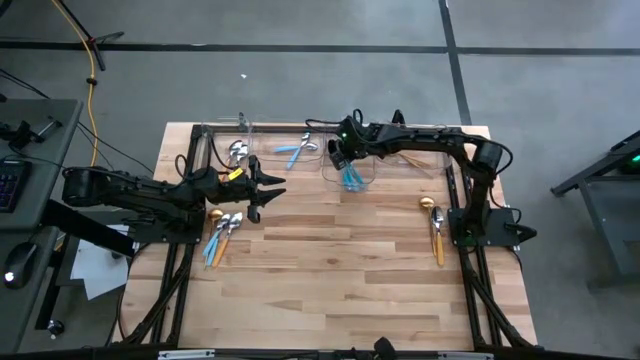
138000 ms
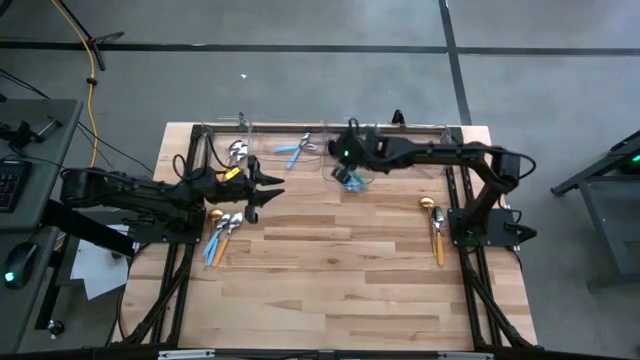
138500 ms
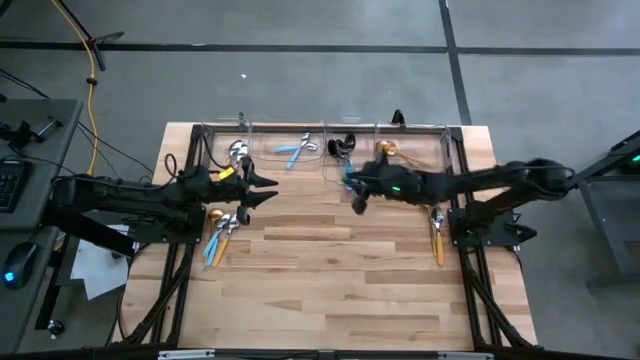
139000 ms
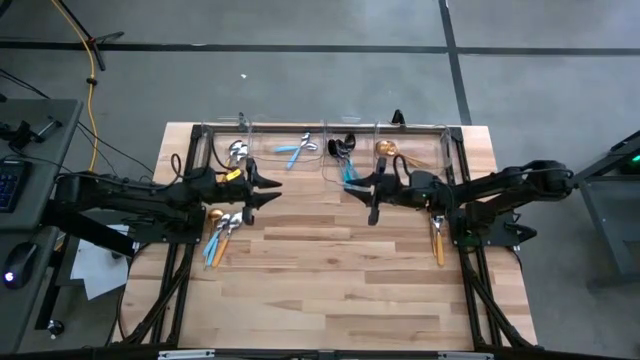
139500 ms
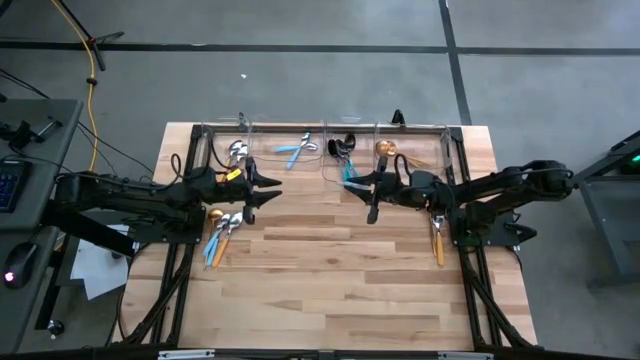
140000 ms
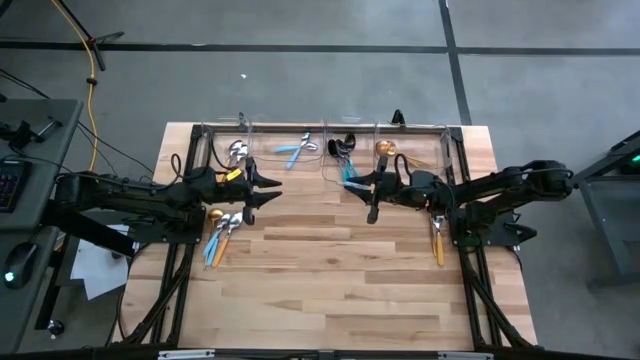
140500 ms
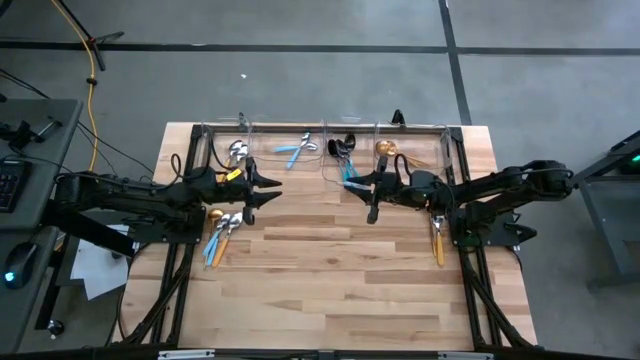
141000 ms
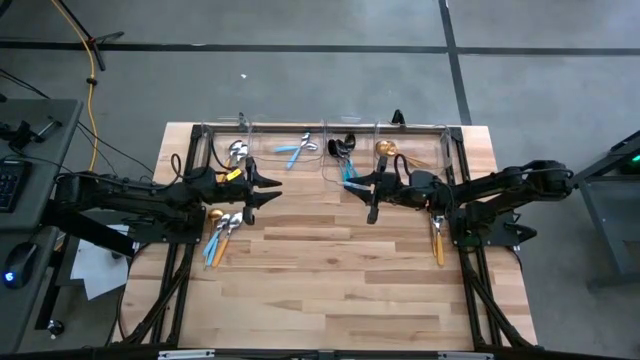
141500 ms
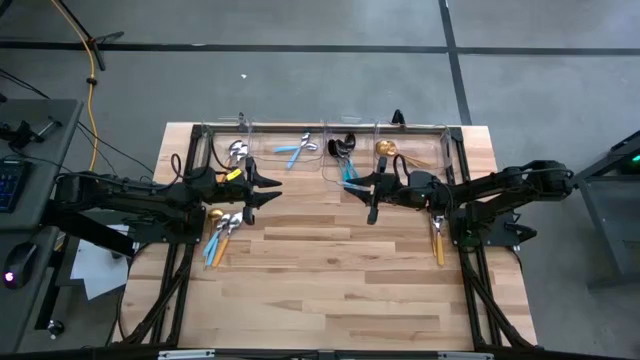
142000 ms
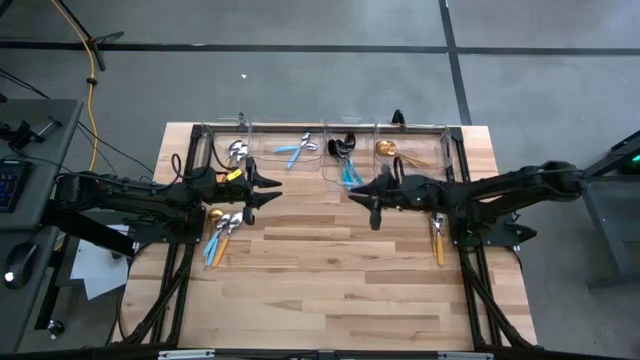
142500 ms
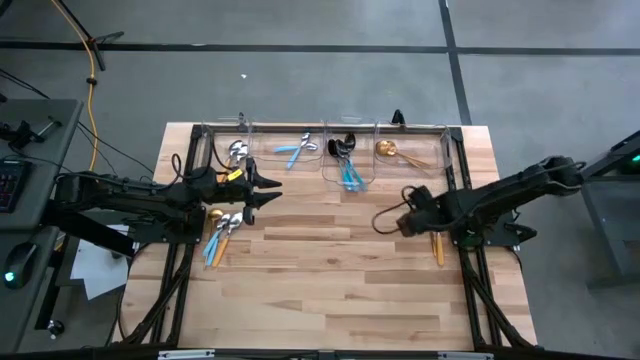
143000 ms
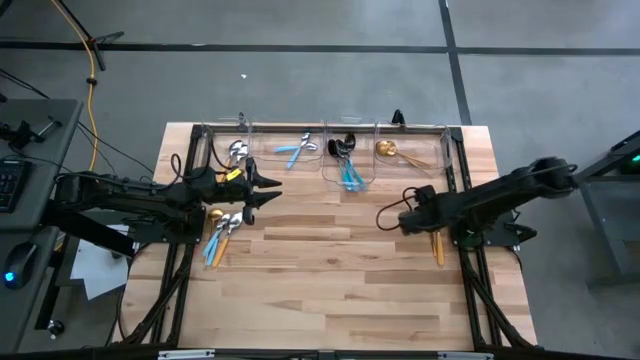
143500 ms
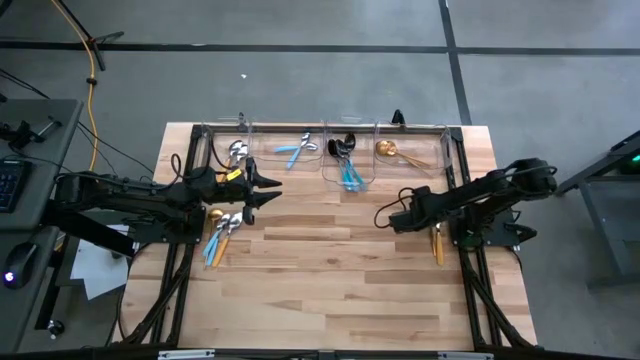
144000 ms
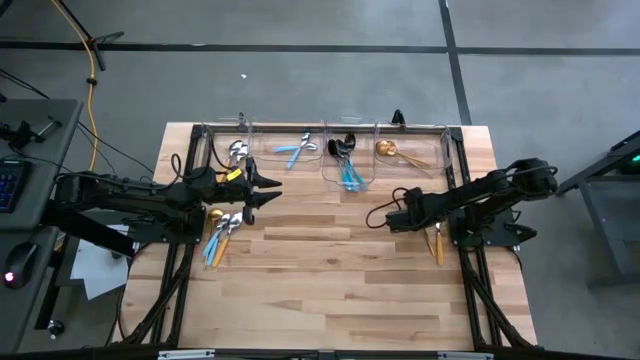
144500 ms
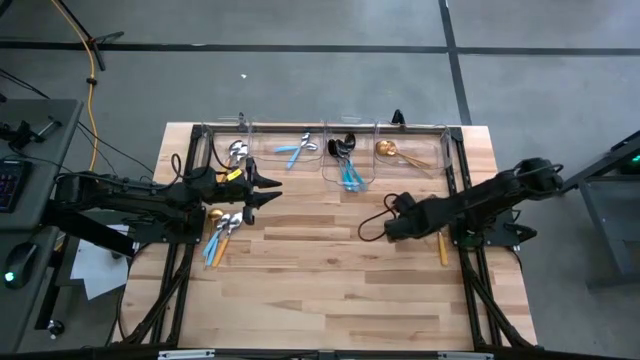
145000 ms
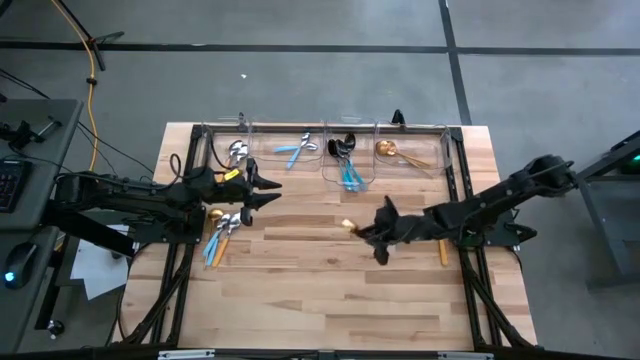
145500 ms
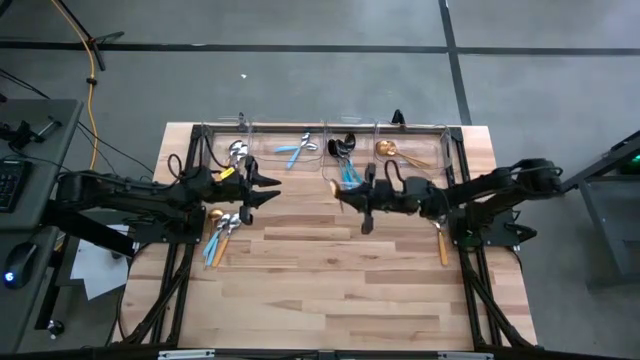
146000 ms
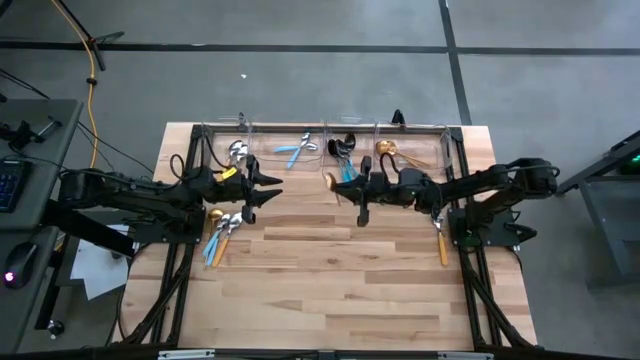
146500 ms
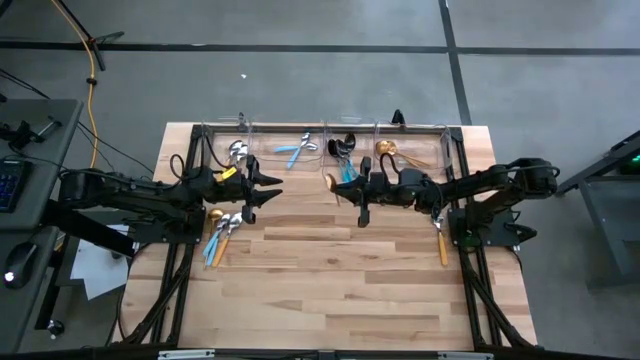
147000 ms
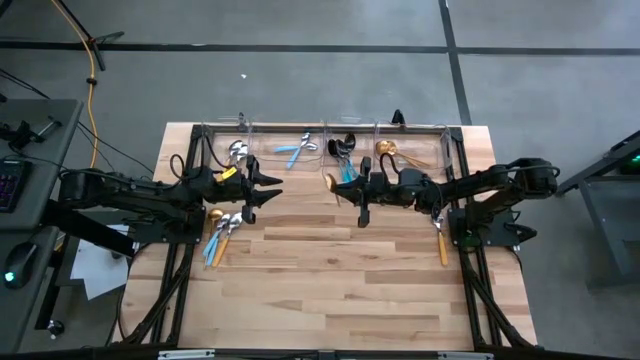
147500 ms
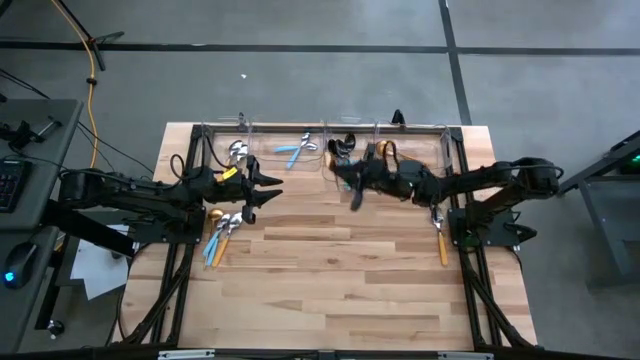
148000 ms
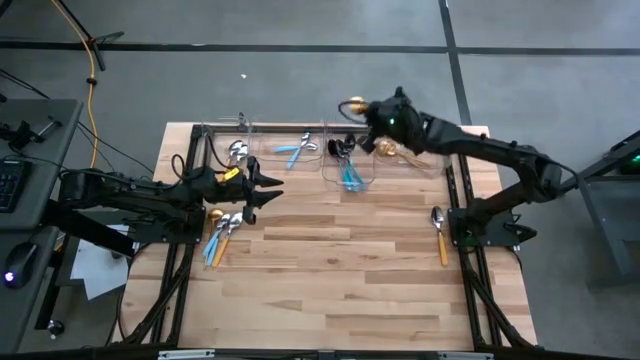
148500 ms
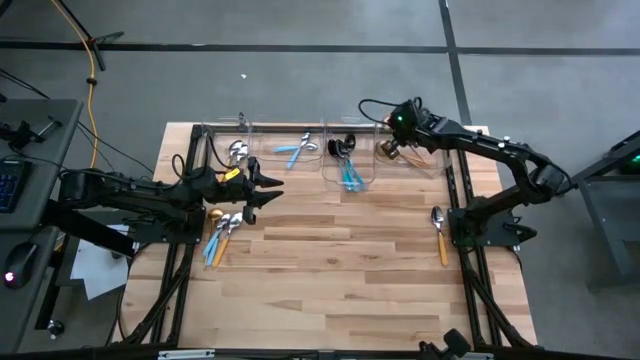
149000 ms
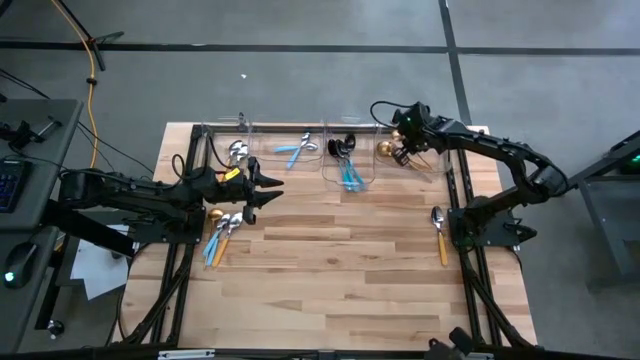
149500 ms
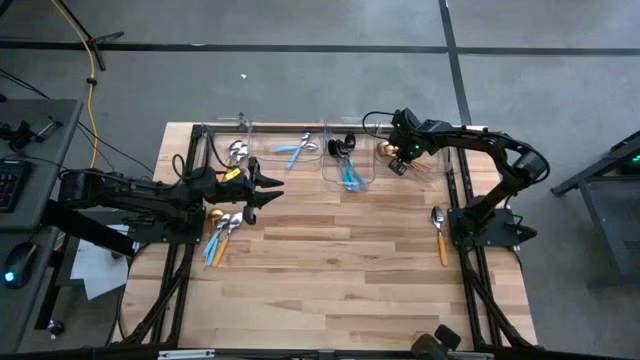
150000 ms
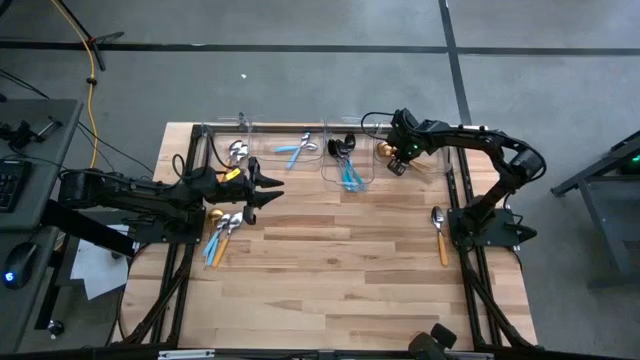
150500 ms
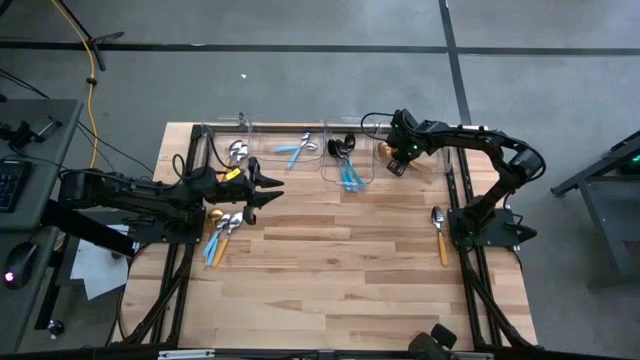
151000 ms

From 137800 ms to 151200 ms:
Task: Sort silverware by color (type)
Put the gold spoon into the right transparent bin

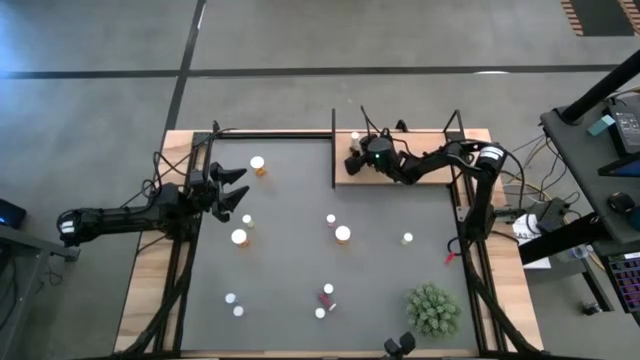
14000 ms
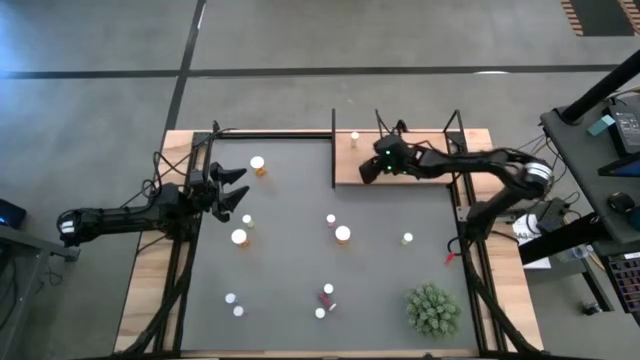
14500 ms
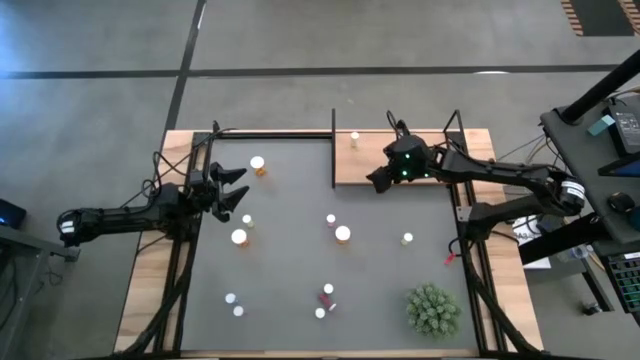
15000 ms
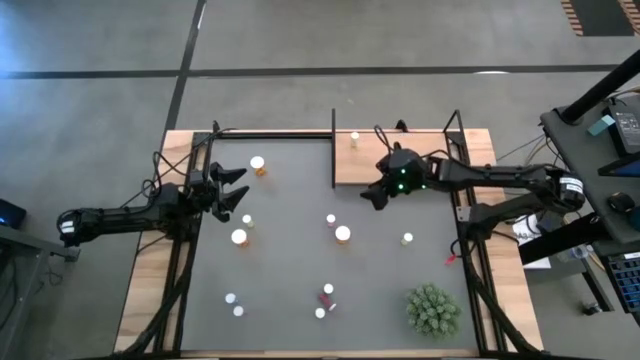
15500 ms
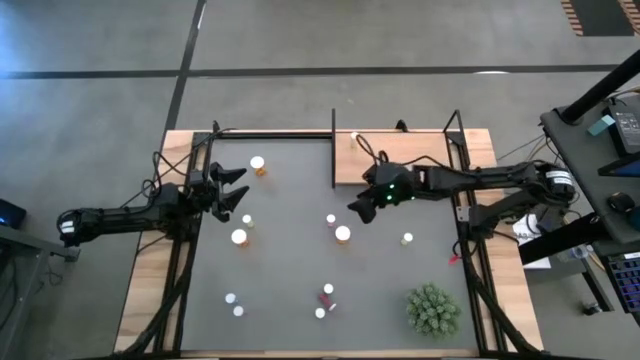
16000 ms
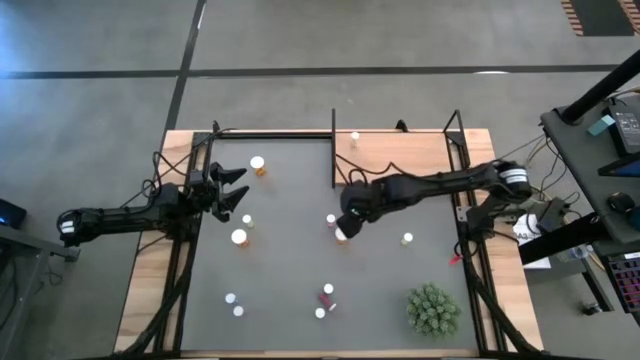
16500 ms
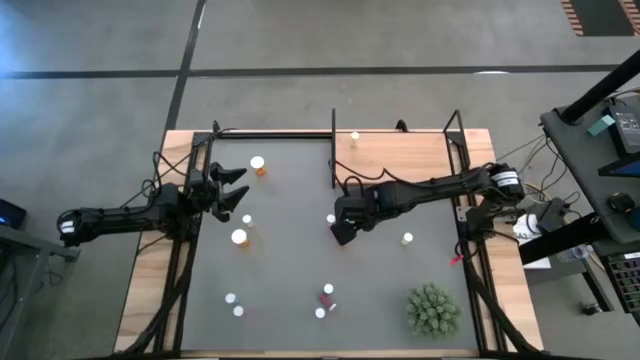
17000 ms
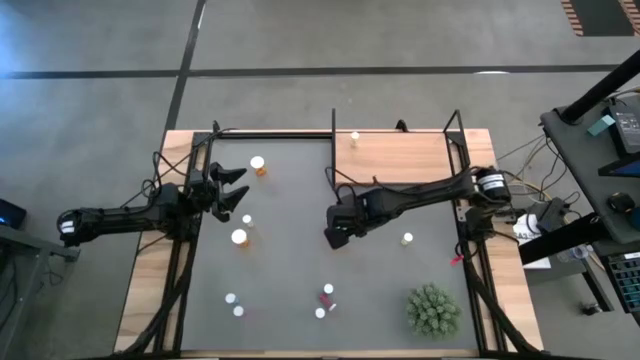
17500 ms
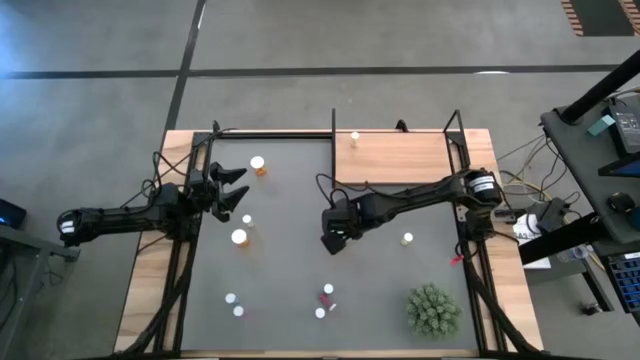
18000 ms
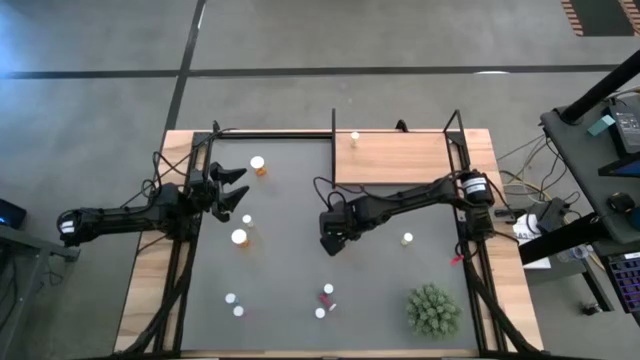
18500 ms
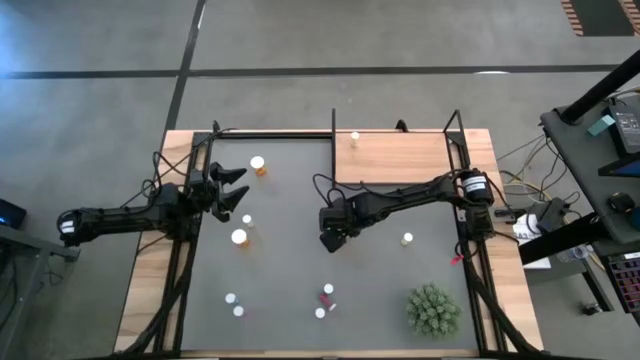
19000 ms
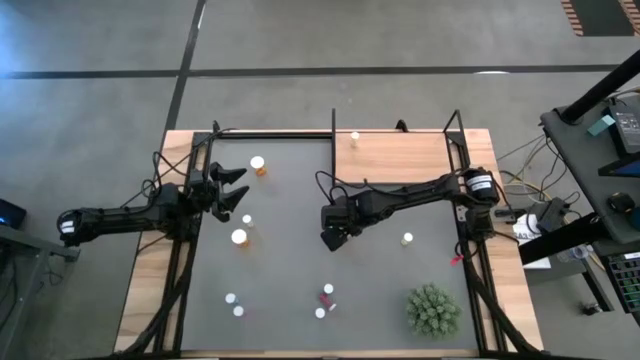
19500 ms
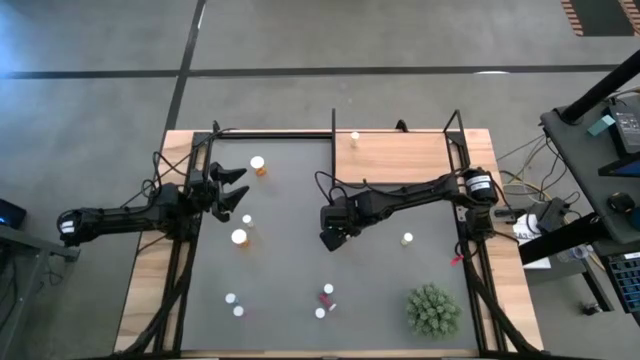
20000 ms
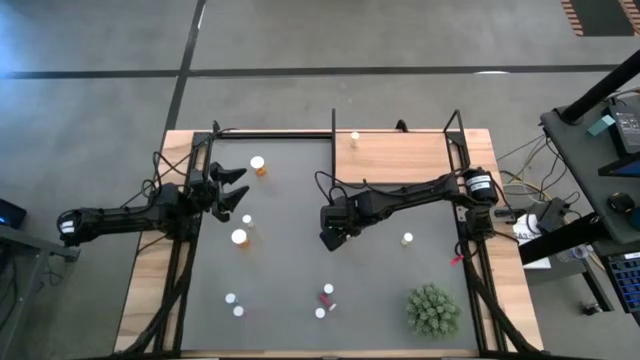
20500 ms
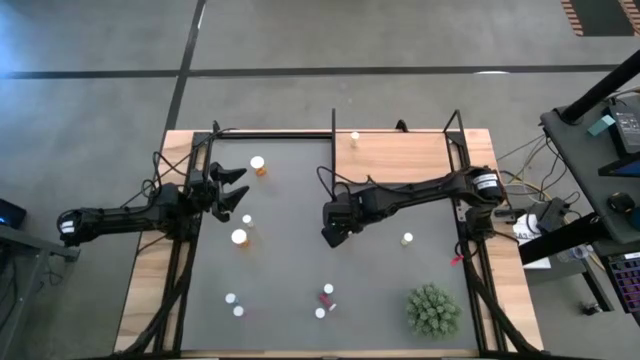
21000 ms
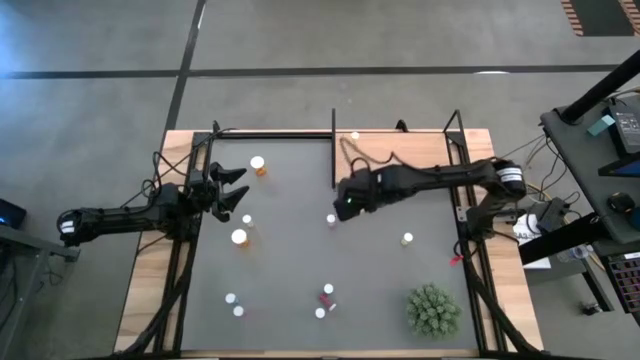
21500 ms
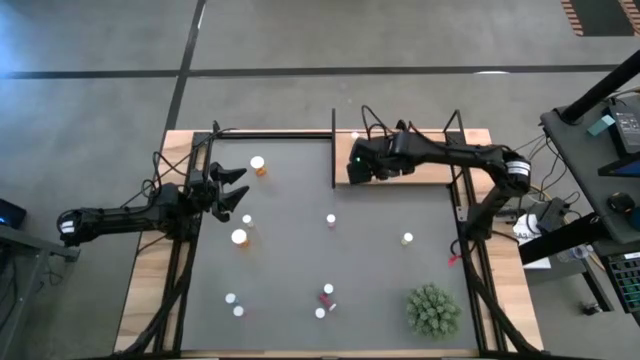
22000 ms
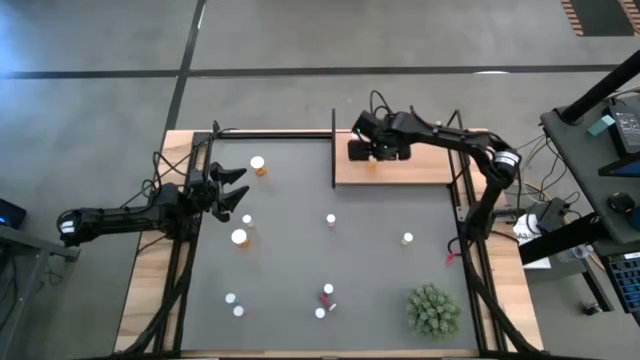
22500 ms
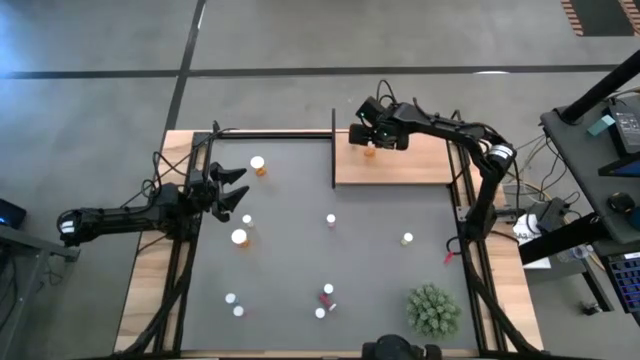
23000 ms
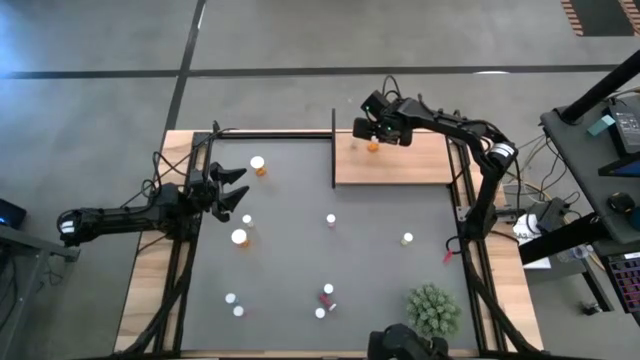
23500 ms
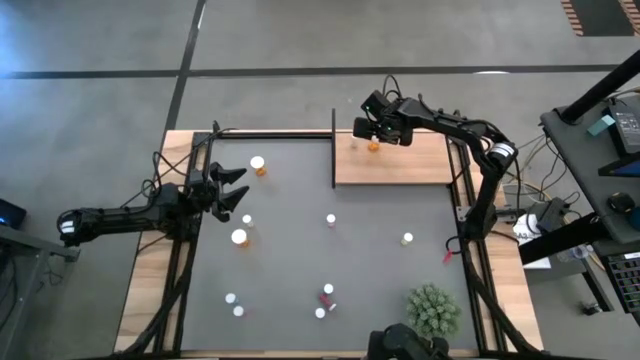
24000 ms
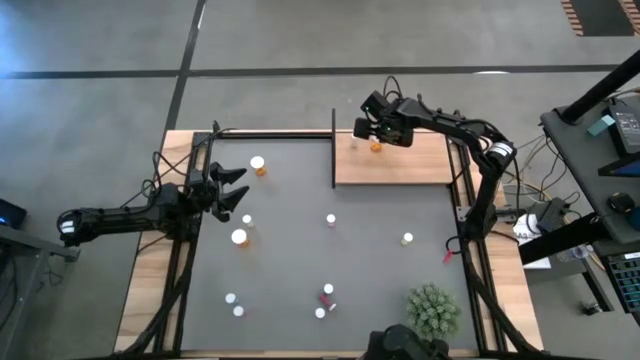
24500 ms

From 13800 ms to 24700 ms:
Task: Pick and place medicine bottles onto shelf by color
Put the right bottom orange medicine bottle on the shelf
